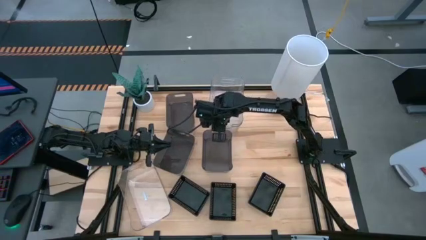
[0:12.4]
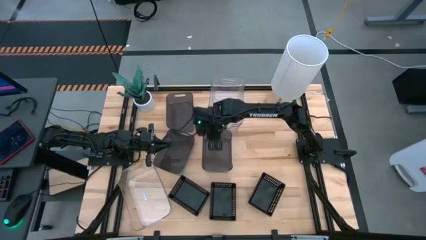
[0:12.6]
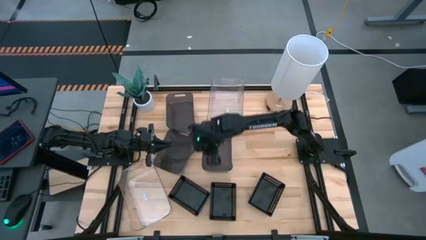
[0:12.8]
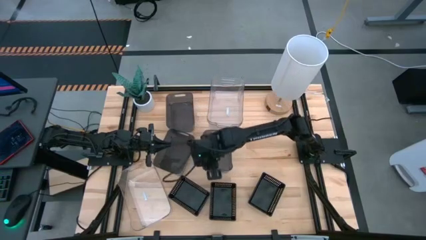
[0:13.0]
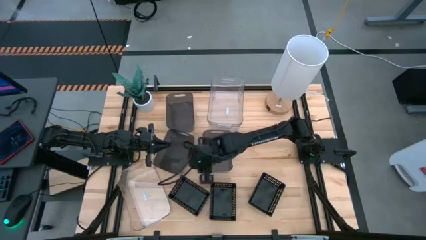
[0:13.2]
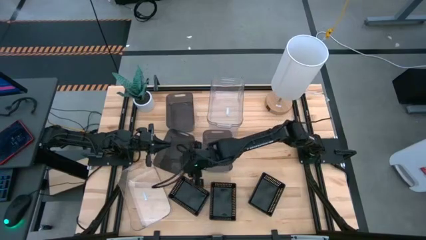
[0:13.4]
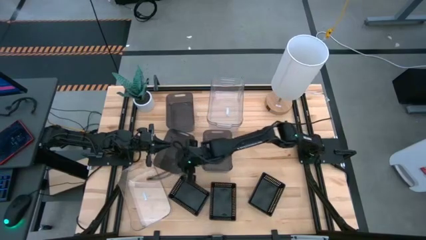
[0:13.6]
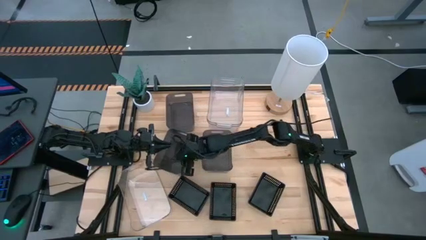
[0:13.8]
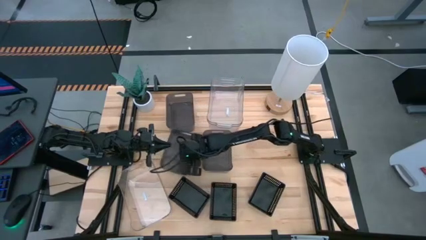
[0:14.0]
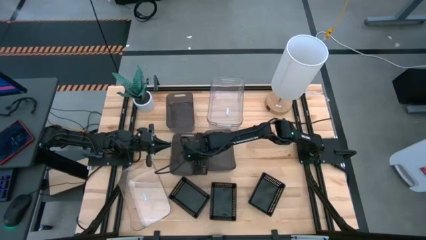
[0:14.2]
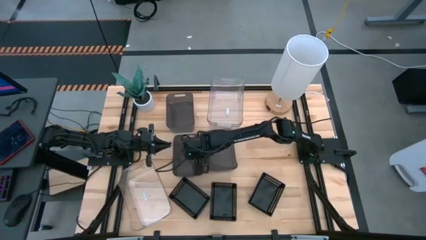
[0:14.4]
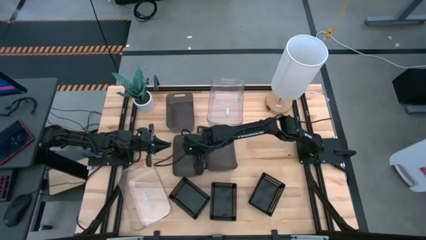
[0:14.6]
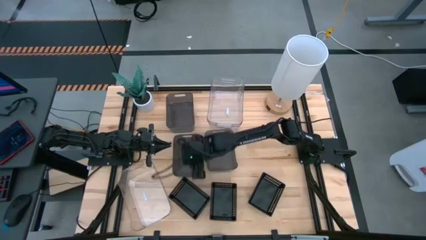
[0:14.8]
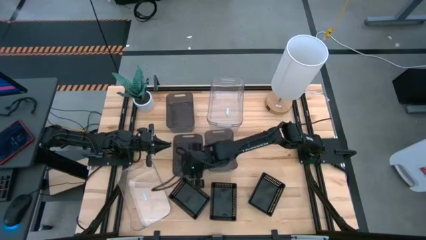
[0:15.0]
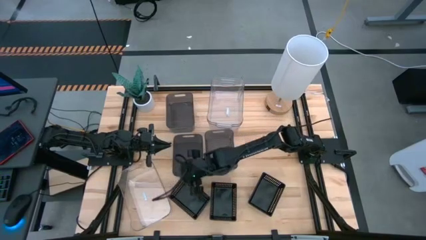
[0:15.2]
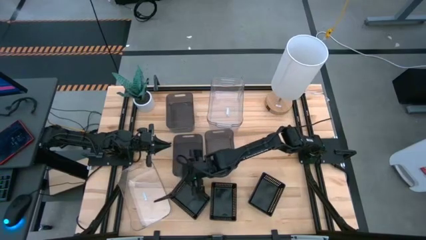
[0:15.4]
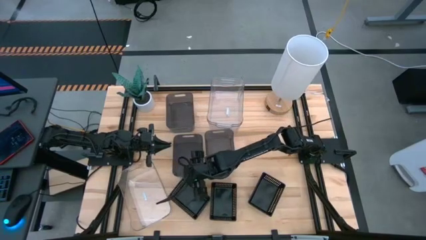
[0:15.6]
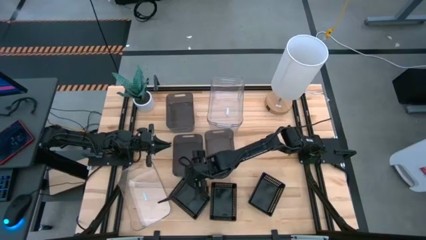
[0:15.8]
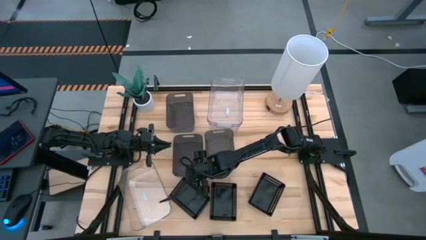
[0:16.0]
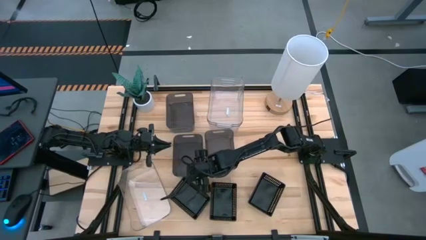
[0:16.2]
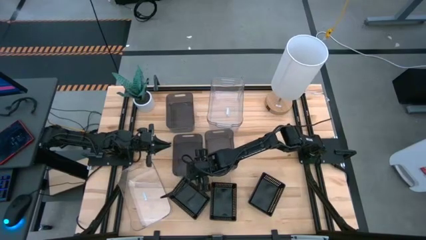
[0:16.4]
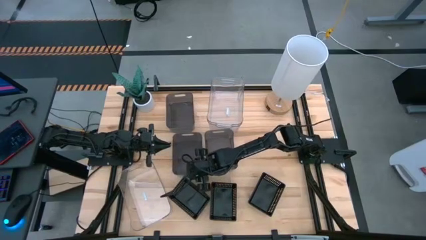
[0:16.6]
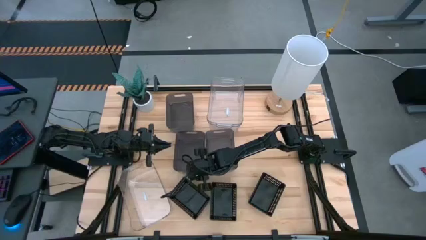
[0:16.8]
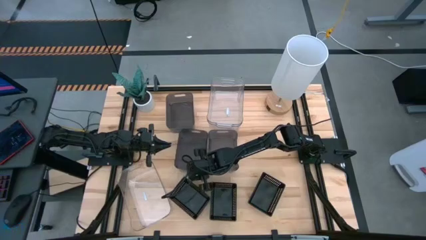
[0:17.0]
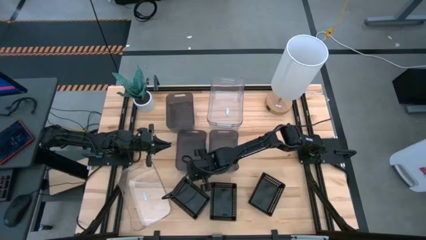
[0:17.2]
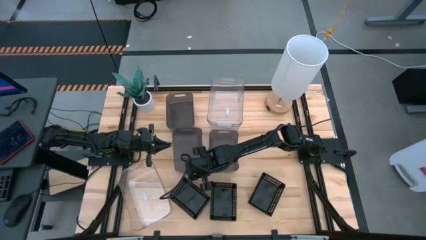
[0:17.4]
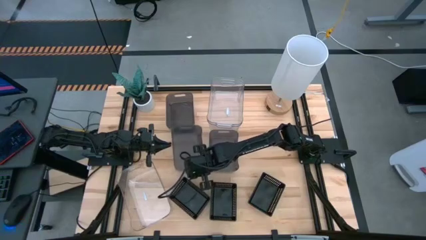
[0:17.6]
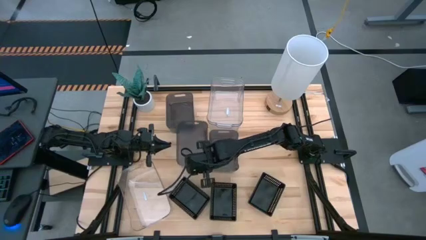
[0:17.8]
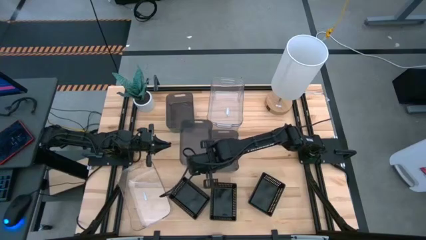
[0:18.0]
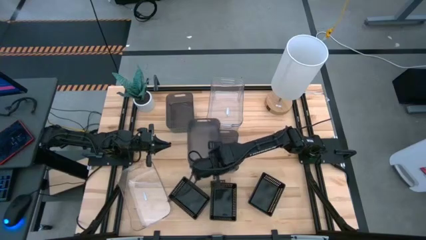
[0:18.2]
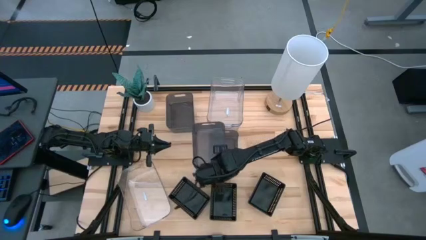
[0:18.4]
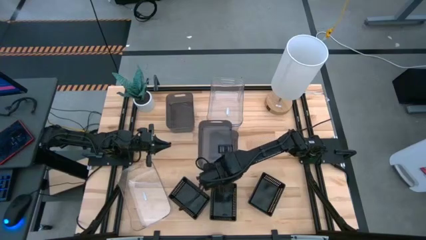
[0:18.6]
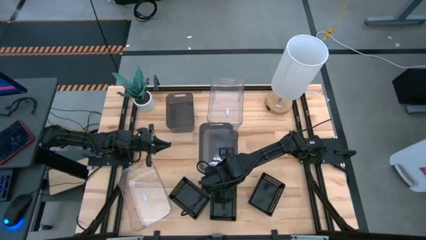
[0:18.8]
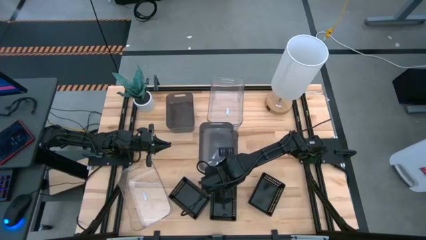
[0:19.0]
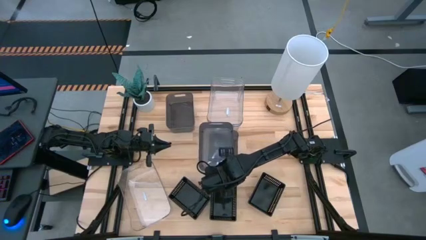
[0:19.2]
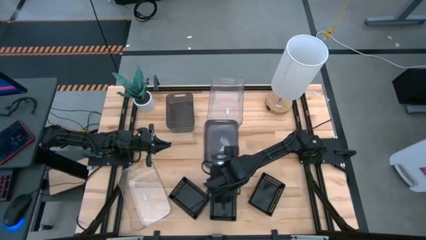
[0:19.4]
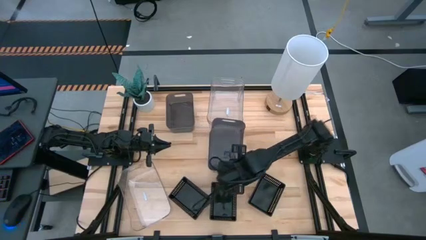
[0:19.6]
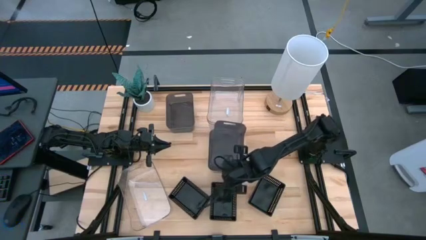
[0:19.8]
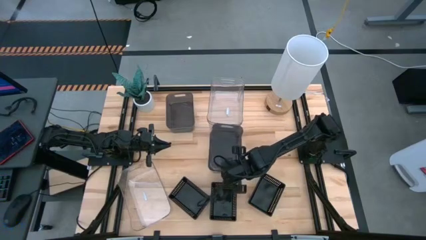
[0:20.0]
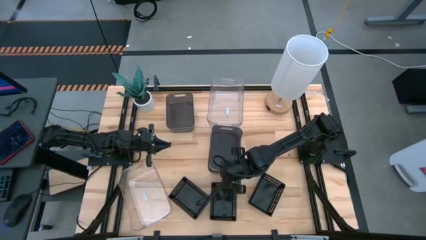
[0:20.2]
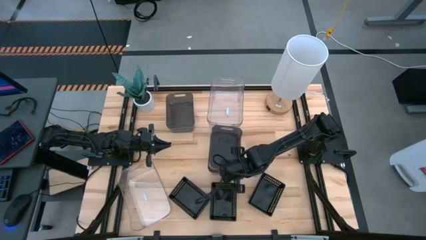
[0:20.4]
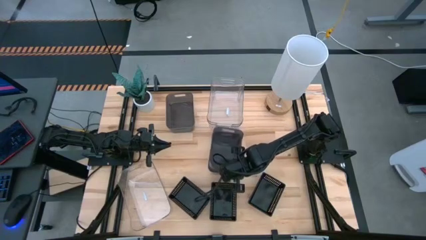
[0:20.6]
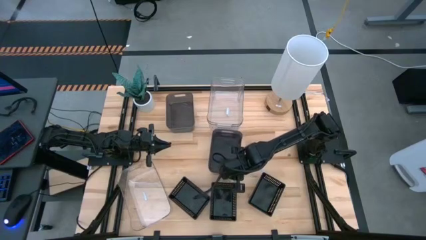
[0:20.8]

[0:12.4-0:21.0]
Stack the left transparent black bin on top of the right transparent black bin

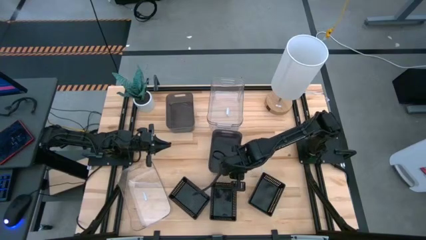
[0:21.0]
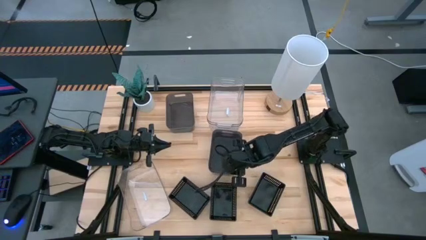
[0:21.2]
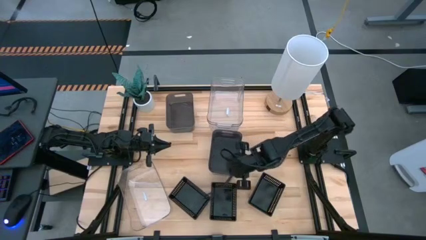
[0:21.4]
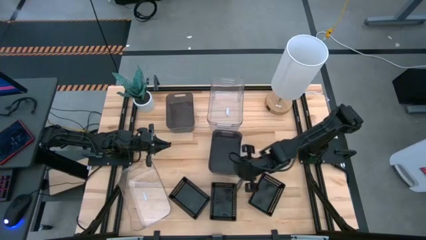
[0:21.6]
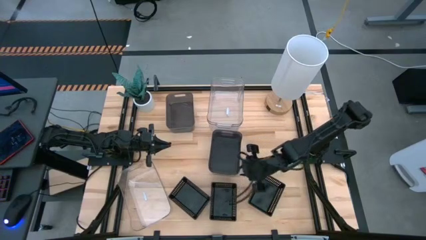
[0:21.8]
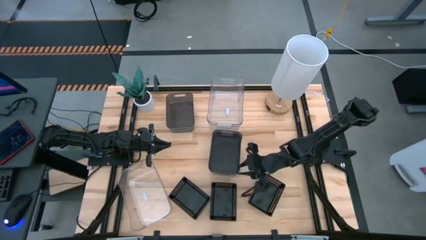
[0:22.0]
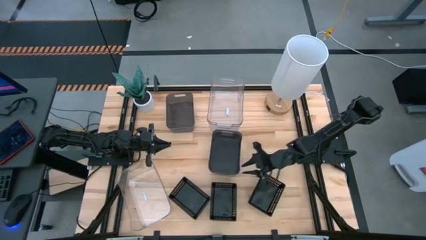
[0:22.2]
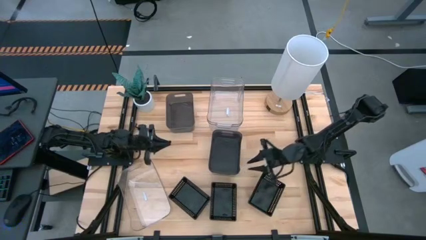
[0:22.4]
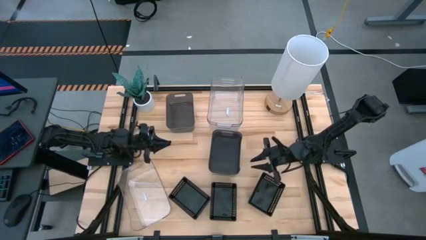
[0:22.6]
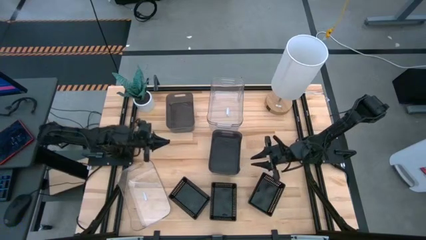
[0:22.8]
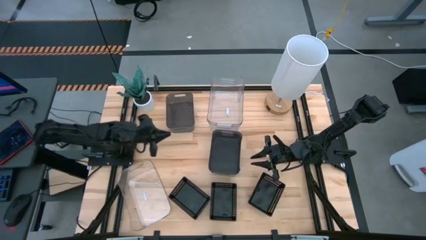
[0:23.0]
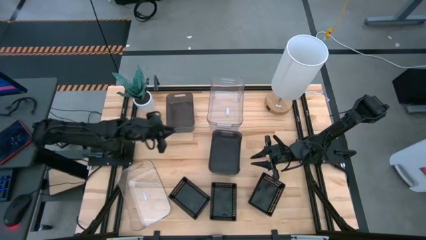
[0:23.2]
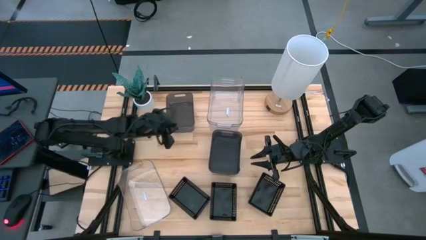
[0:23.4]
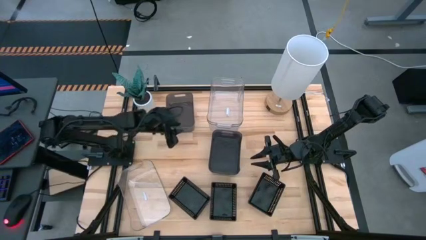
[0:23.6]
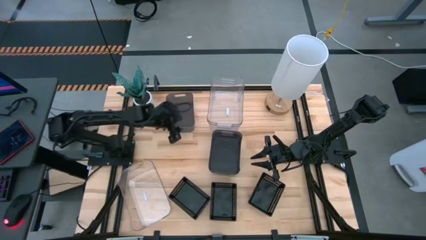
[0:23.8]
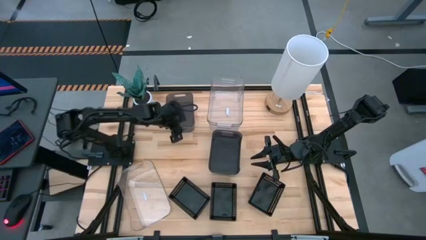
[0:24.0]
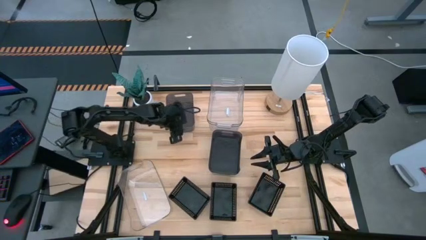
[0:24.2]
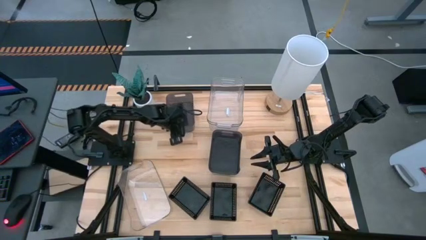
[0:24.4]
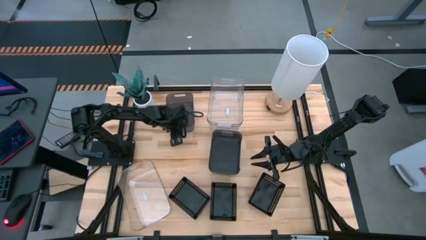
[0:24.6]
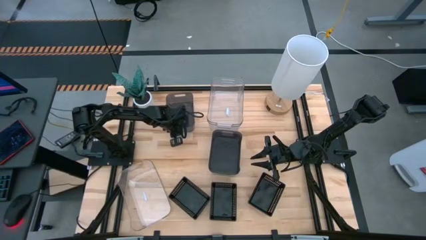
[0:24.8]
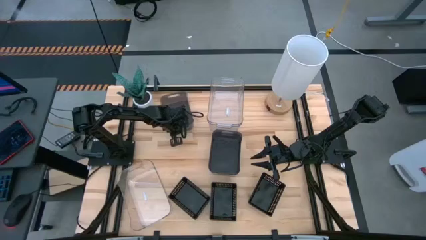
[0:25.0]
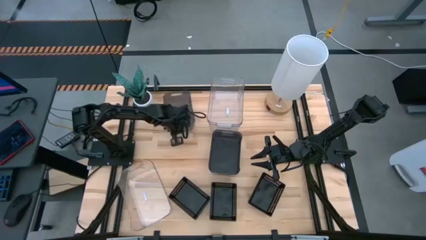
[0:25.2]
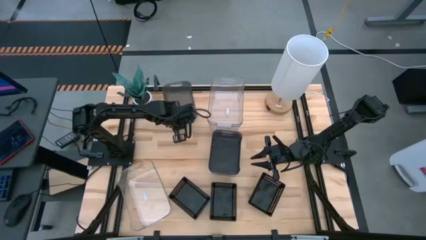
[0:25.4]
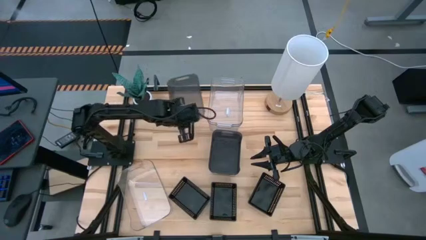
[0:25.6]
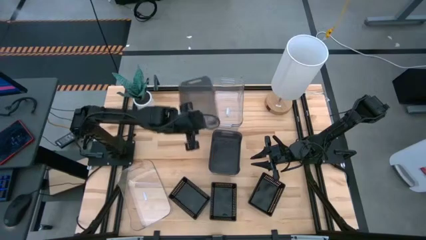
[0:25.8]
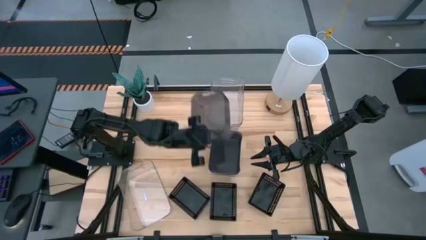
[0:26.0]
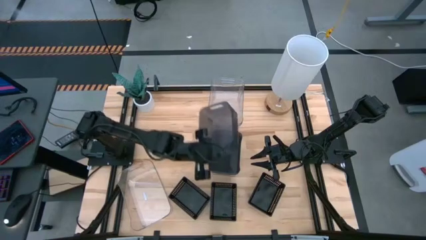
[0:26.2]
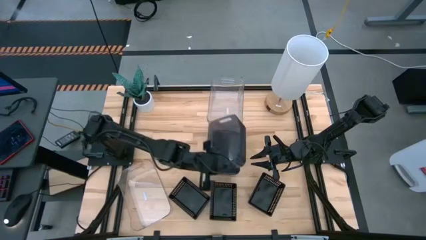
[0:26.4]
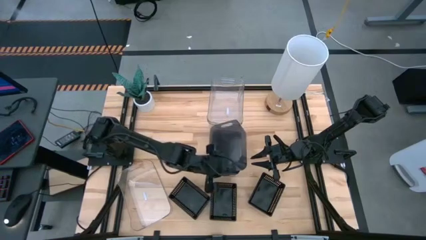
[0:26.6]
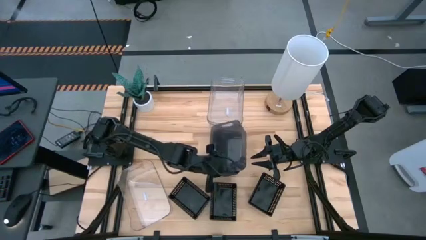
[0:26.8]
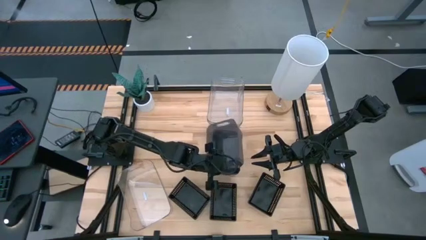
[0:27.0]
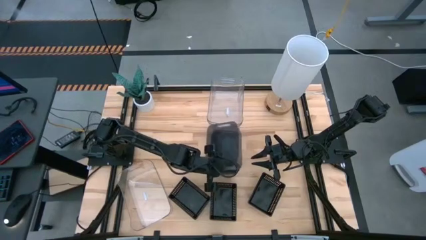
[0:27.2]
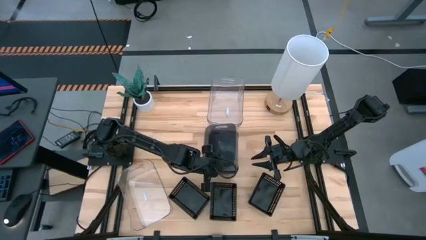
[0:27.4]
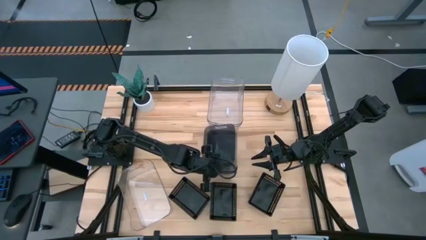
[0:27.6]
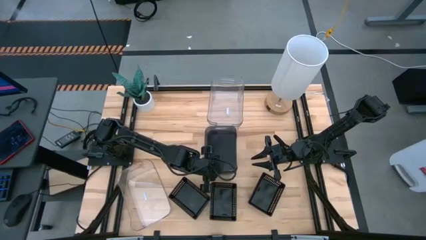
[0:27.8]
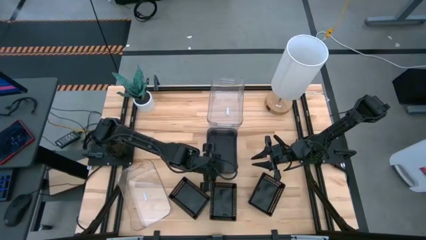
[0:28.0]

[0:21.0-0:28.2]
Stack the left transparent black bin on top of the transparent black bin
